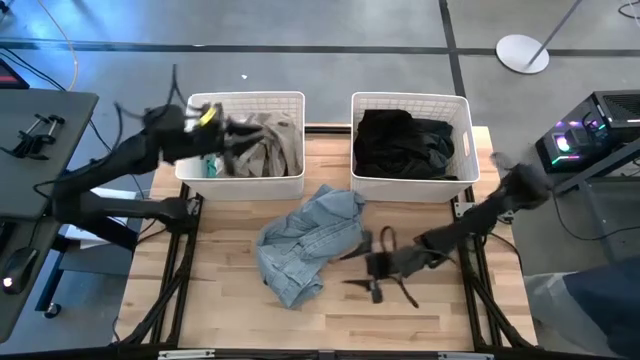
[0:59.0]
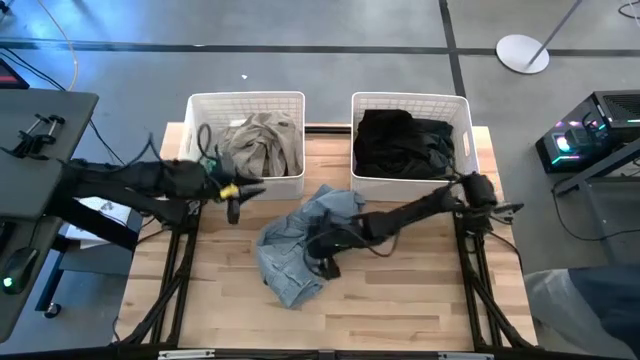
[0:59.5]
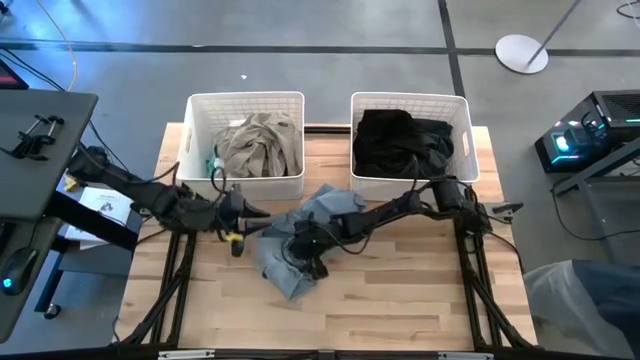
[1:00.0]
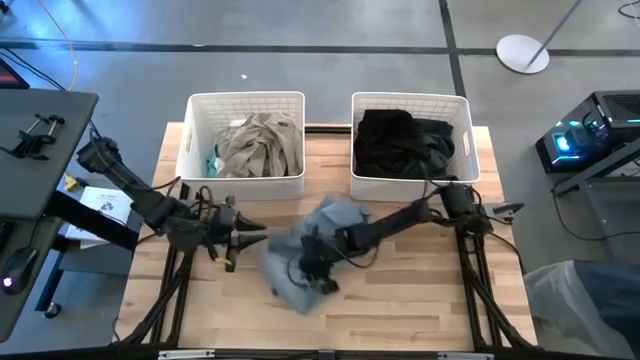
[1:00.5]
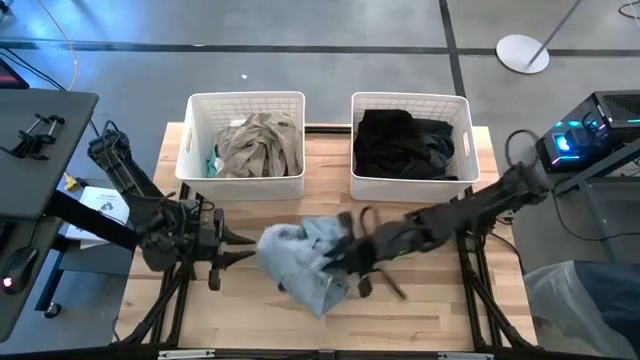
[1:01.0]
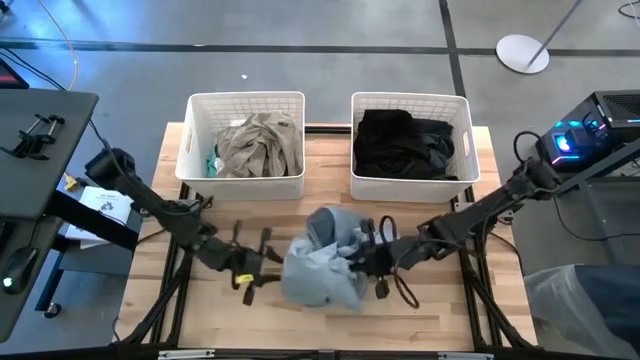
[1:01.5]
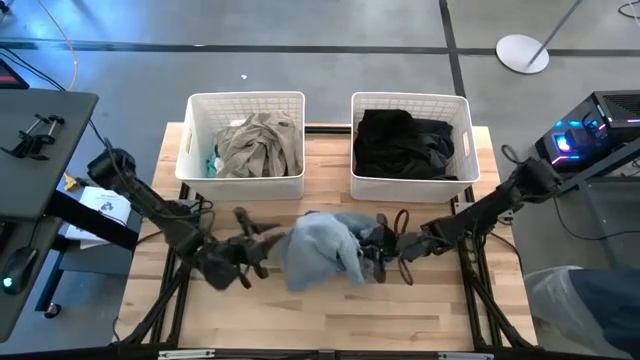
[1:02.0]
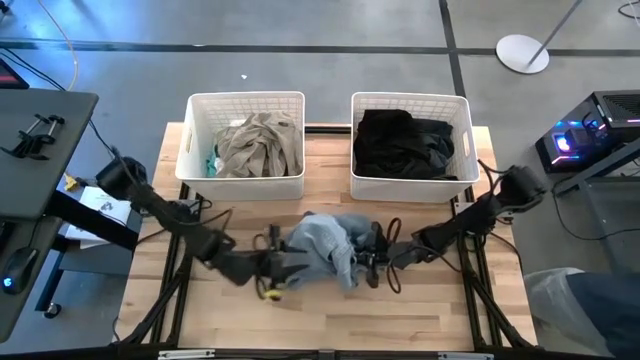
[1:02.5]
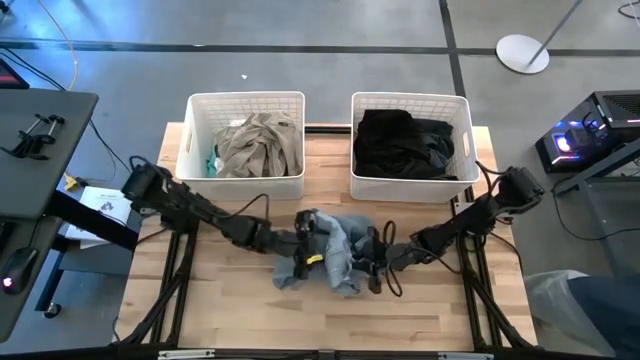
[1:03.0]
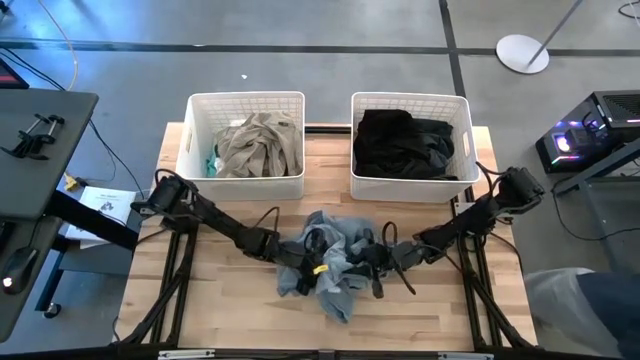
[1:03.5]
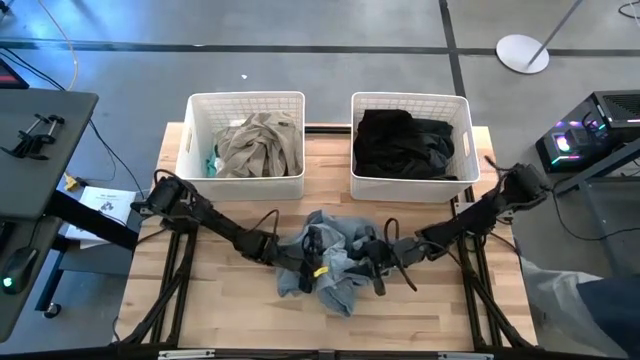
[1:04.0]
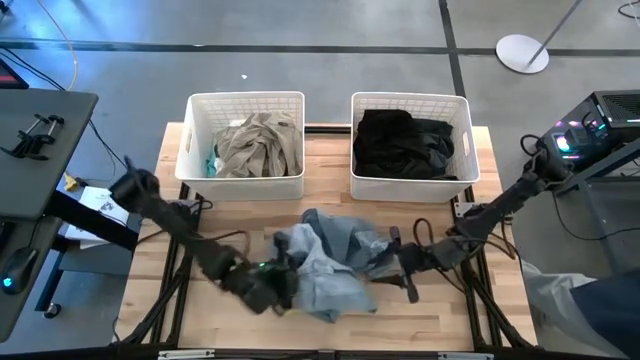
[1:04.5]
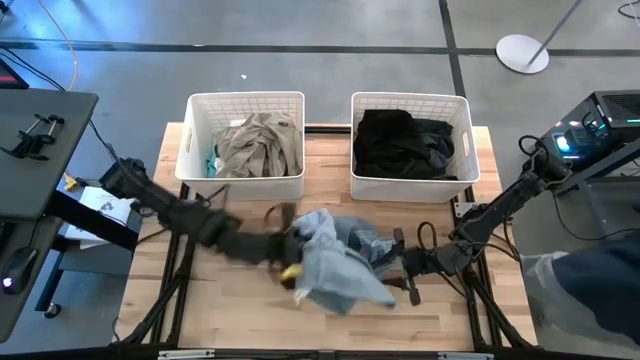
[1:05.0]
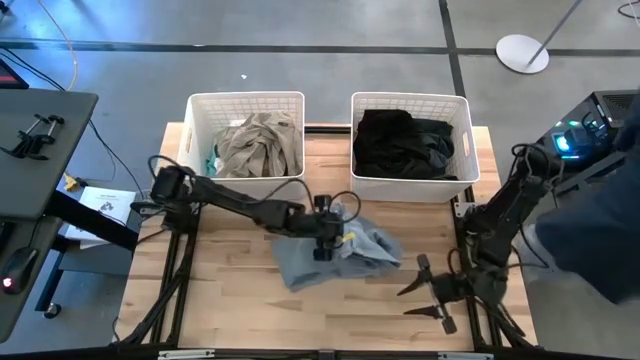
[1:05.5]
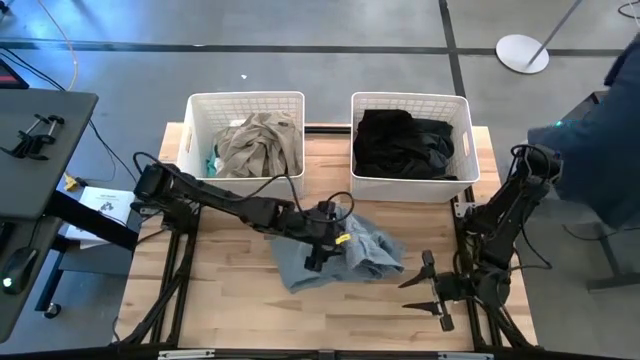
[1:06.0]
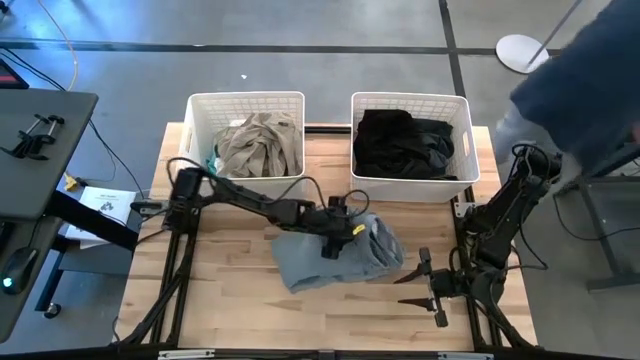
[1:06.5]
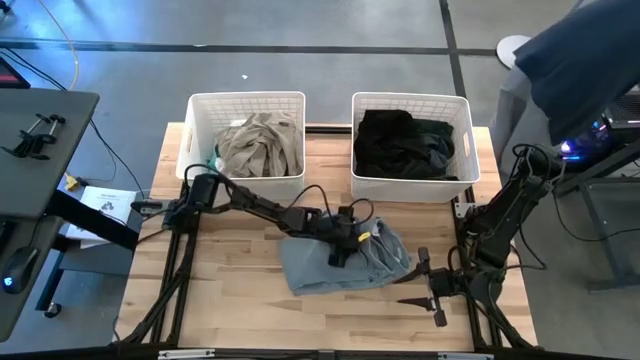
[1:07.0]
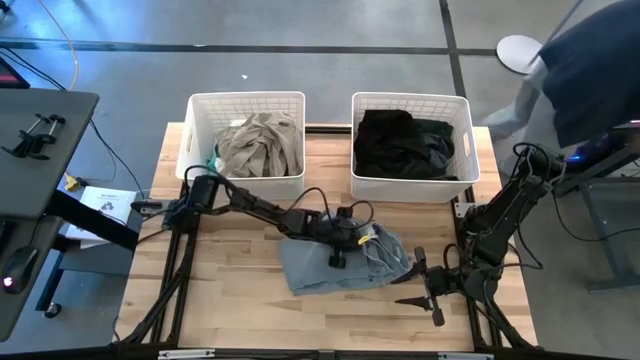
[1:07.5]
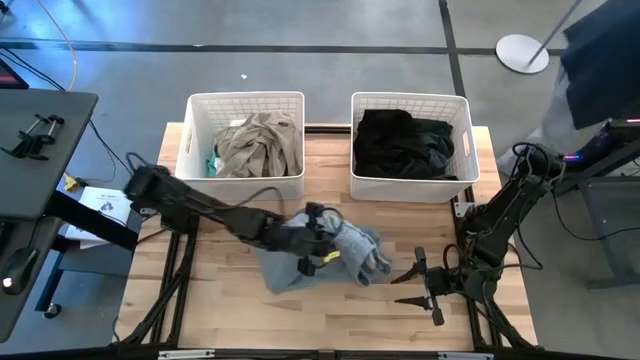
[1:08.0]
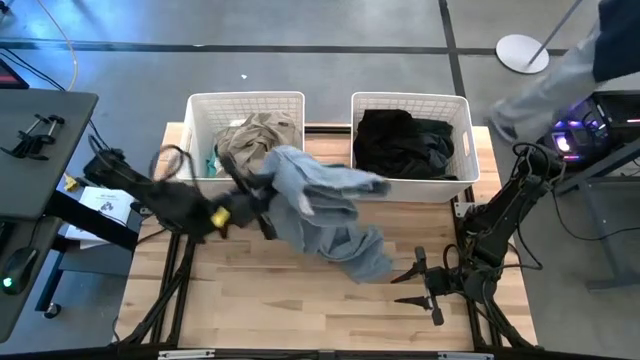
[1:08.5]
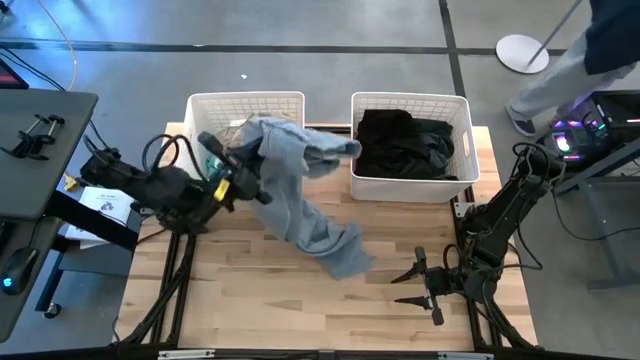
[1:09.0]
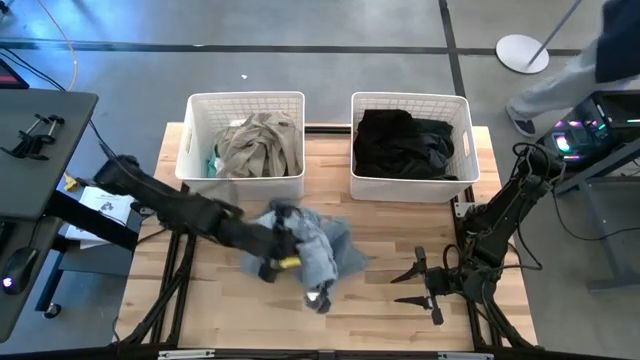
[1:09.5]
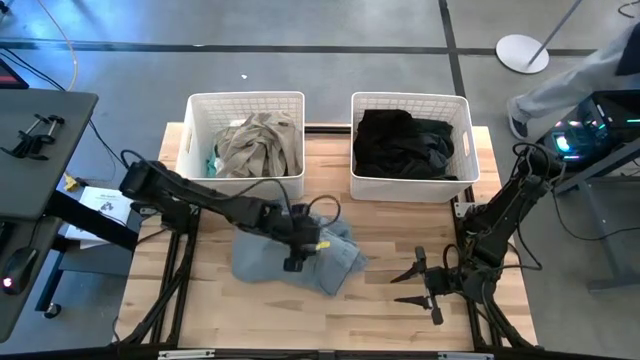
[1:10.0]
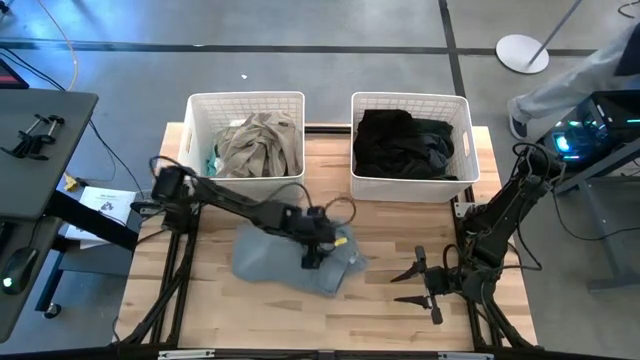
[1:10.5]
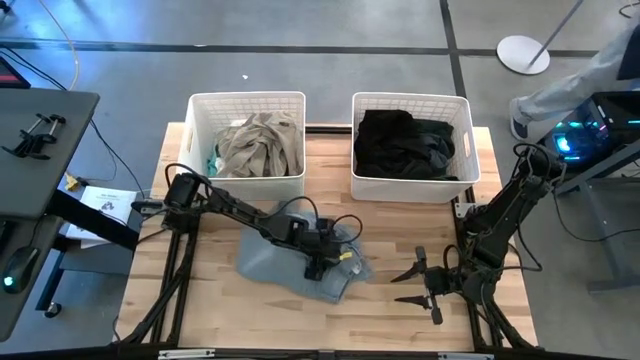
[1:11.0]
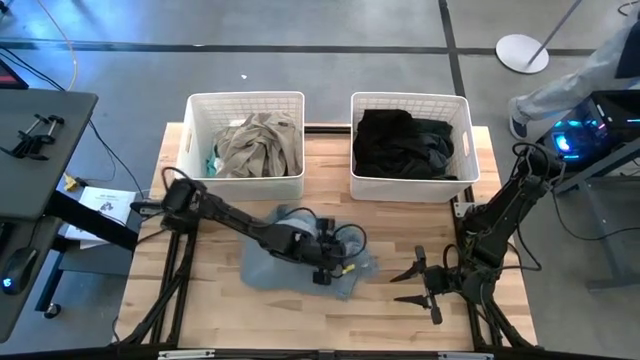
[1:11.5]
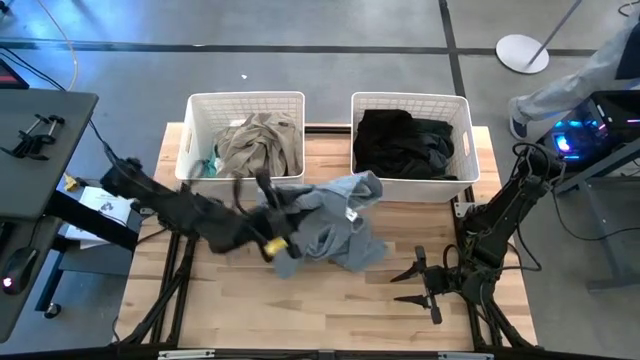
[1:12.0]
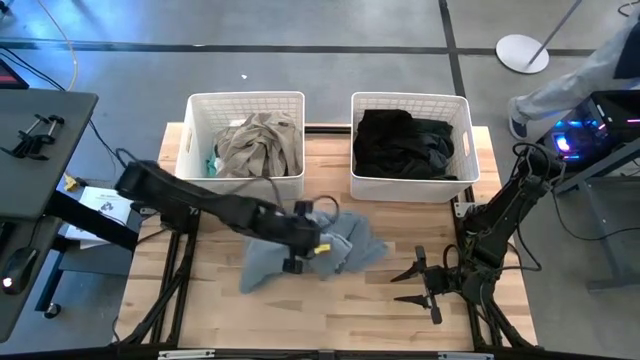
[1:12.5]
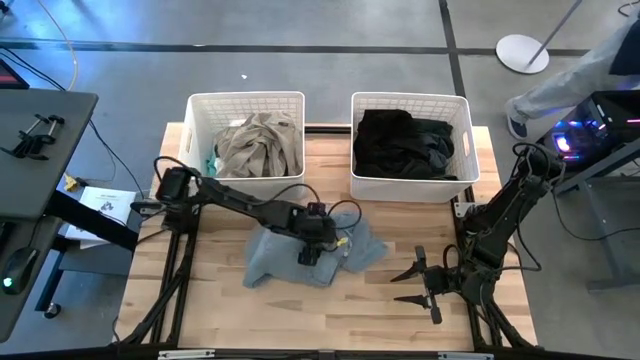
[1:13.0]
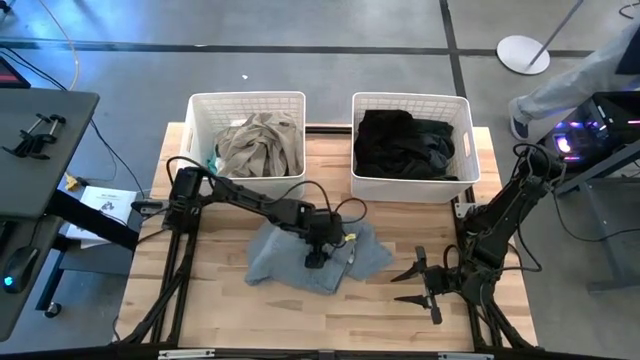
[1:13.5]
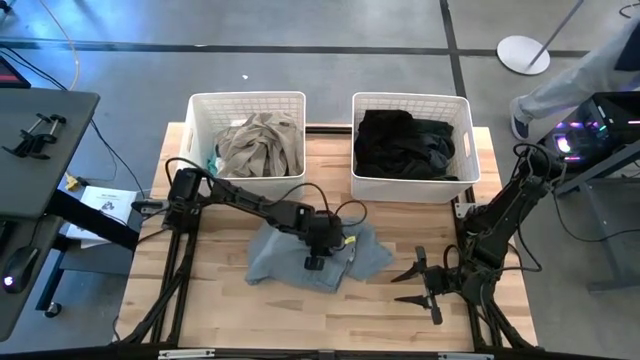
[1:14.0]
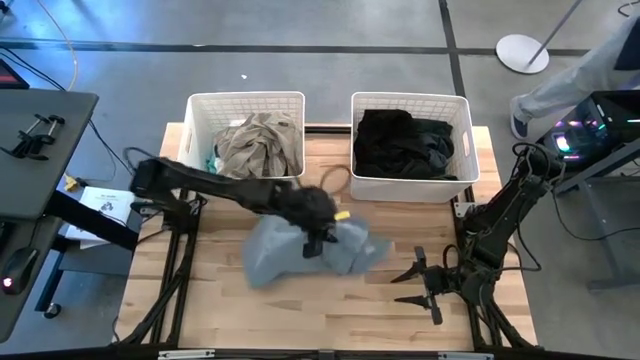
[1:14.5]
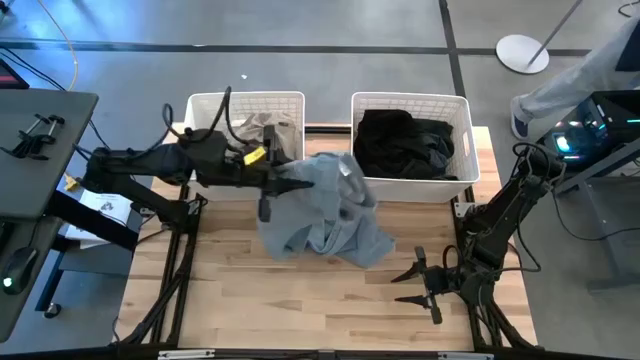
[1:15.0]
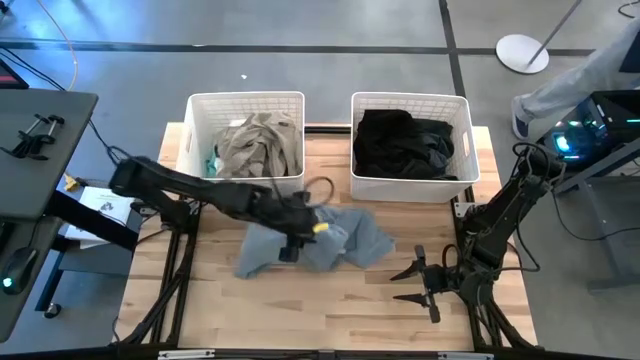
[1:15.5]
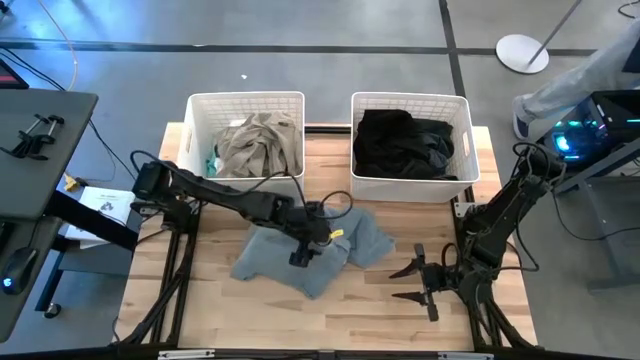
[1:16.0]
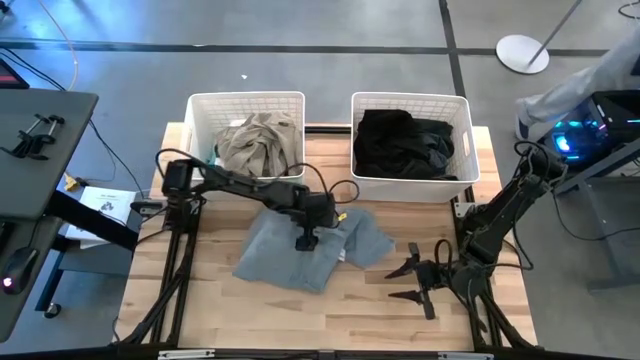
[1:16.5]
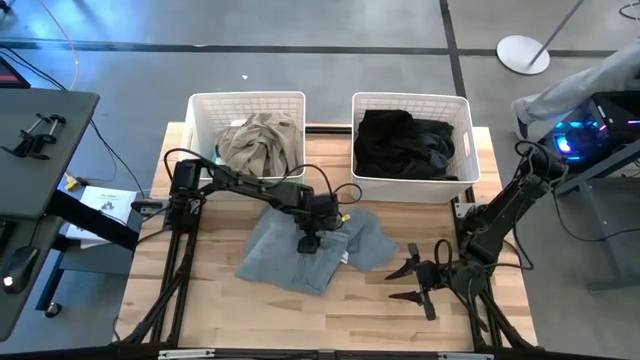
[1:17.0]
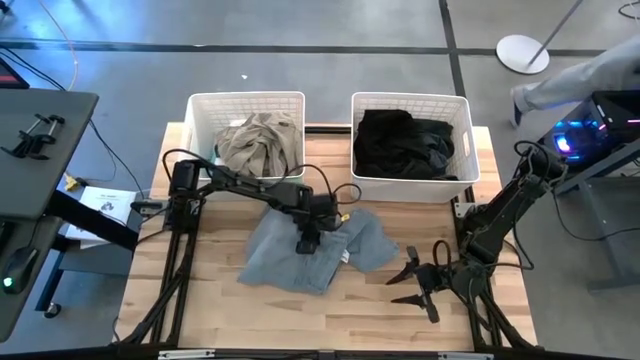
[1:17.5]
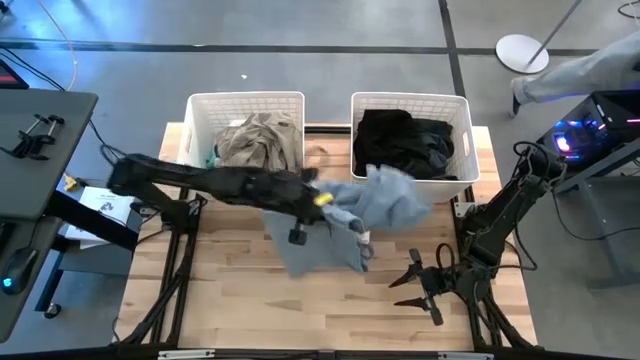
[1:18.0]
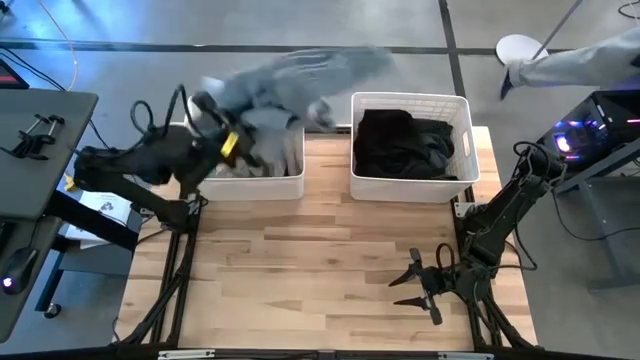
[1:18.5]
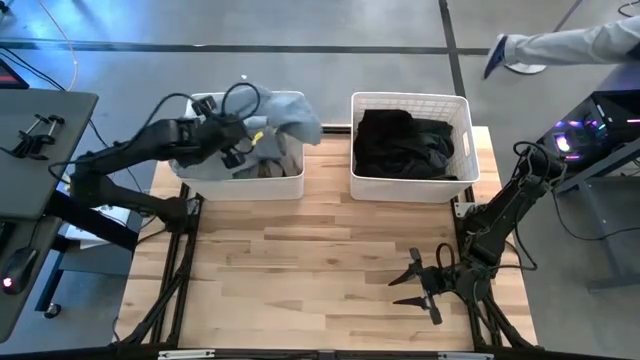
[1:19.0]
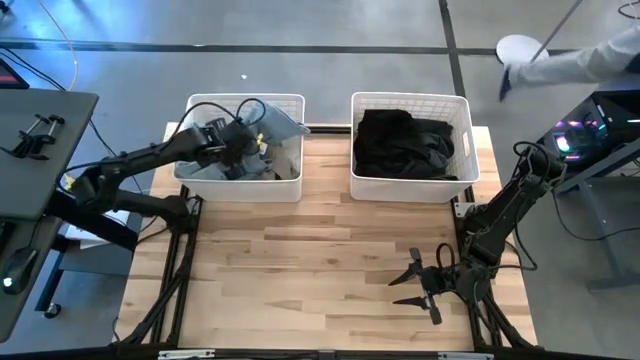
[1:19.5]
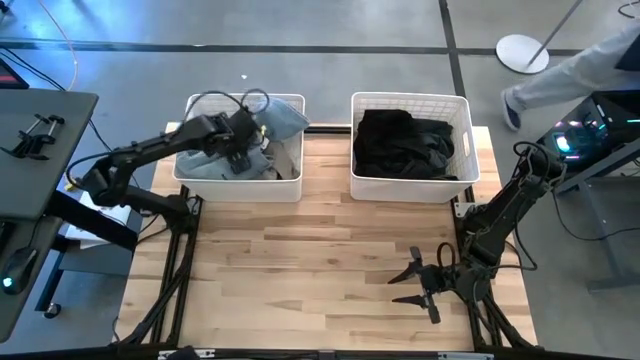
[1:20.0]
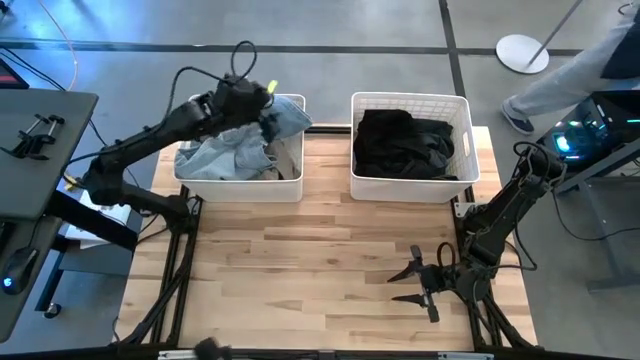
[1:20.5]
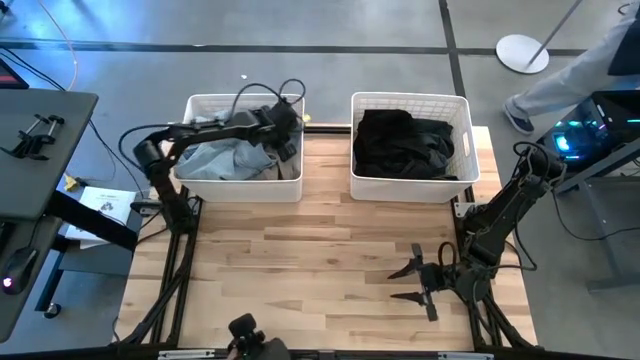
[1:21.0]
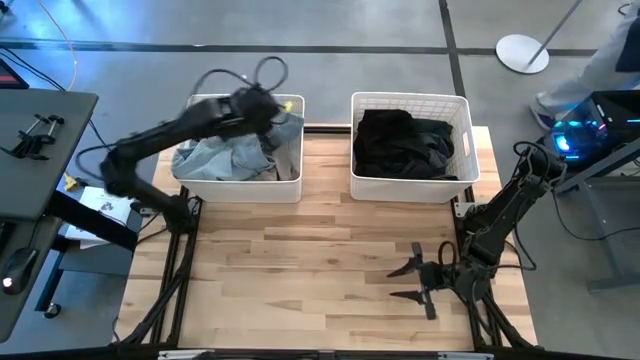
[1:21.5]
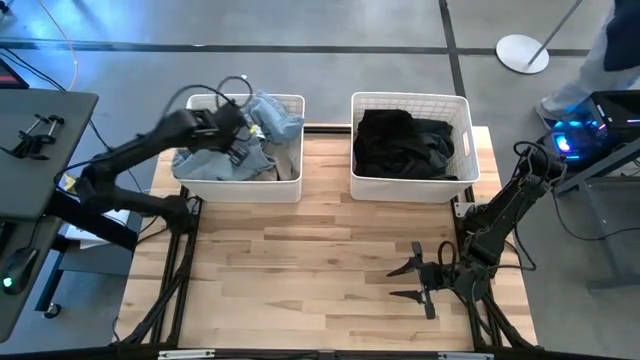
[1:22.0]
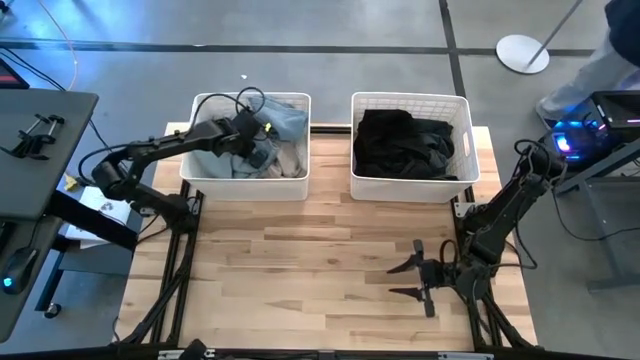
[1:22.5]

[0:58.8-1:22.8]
Task: Sort clothes
Put the light blue pants into the left white laundry bin
